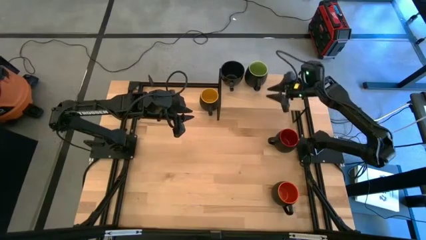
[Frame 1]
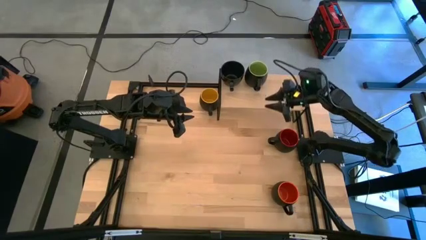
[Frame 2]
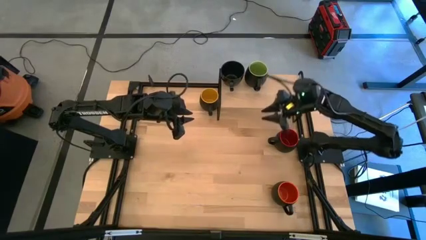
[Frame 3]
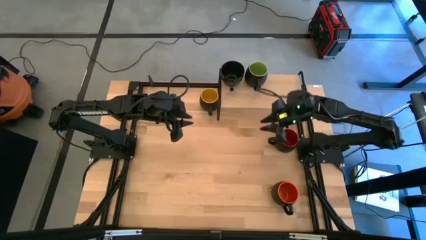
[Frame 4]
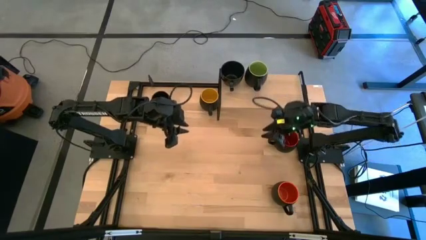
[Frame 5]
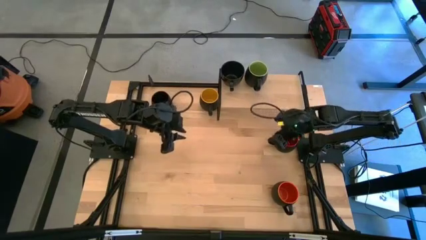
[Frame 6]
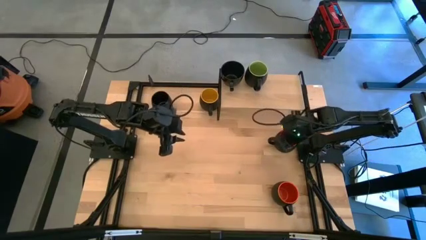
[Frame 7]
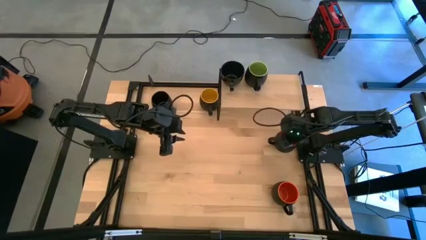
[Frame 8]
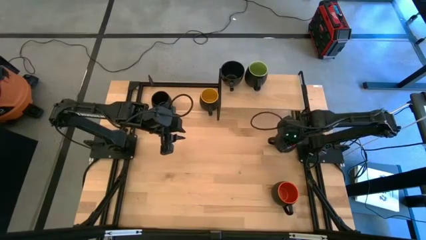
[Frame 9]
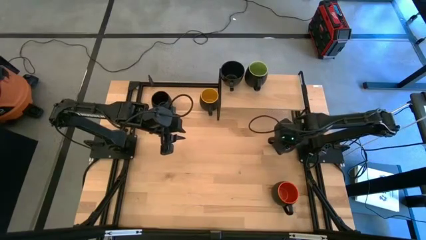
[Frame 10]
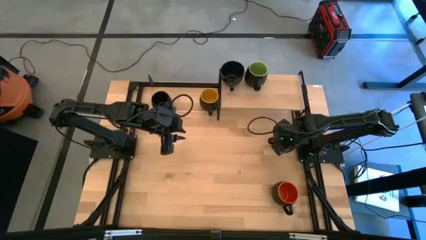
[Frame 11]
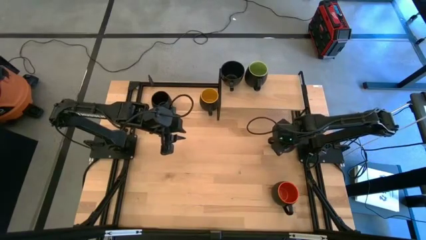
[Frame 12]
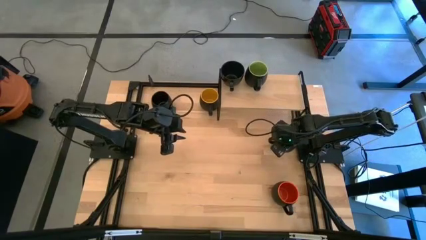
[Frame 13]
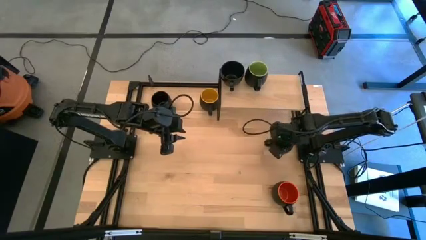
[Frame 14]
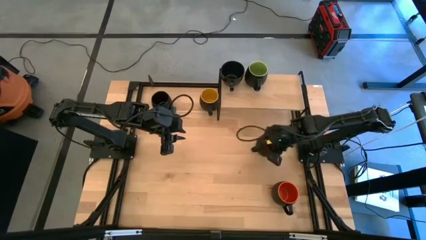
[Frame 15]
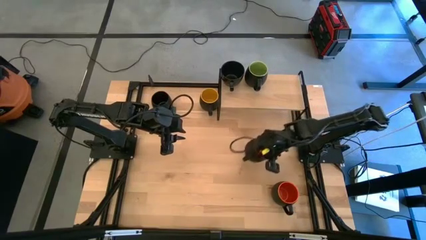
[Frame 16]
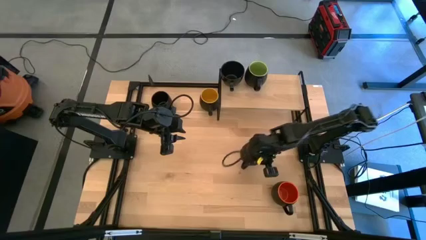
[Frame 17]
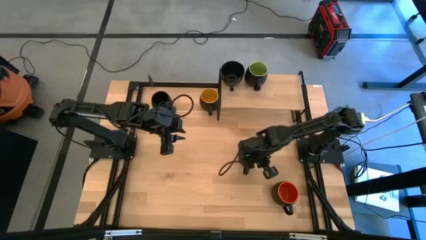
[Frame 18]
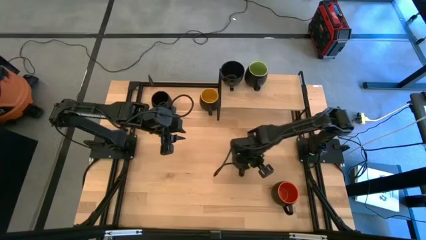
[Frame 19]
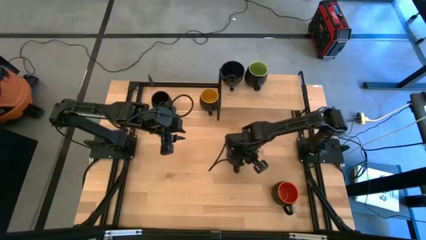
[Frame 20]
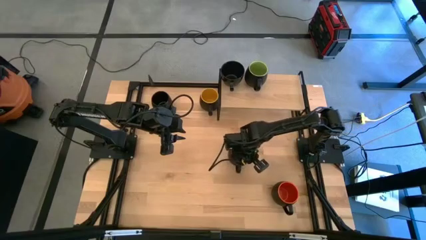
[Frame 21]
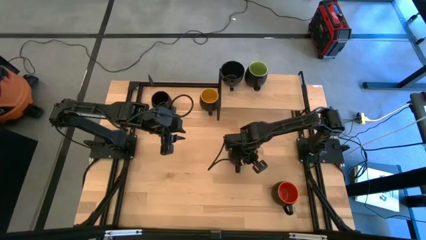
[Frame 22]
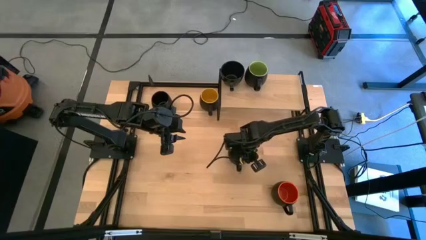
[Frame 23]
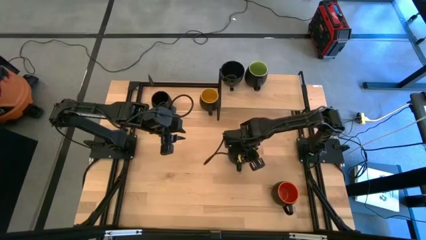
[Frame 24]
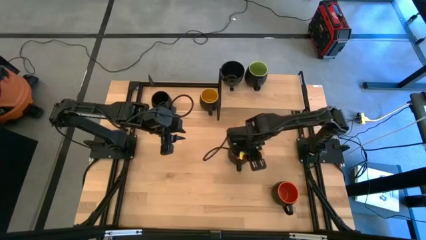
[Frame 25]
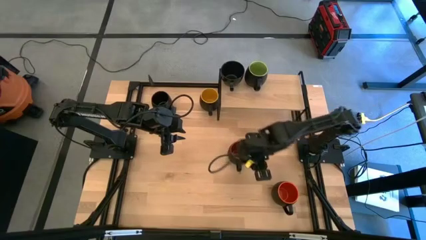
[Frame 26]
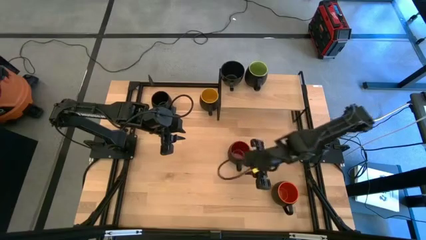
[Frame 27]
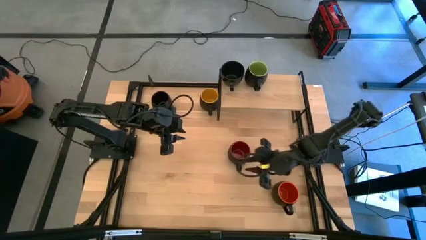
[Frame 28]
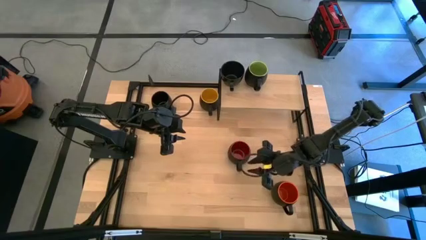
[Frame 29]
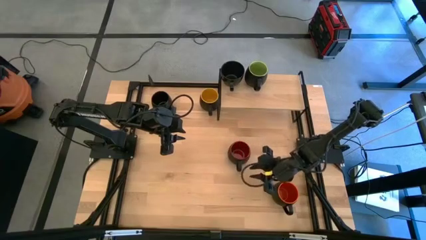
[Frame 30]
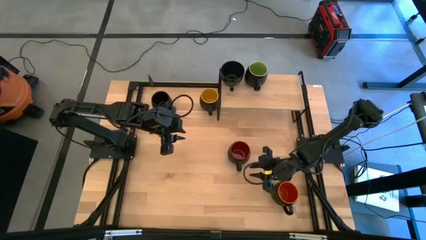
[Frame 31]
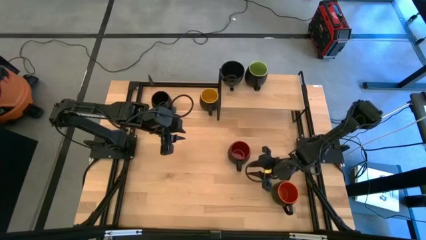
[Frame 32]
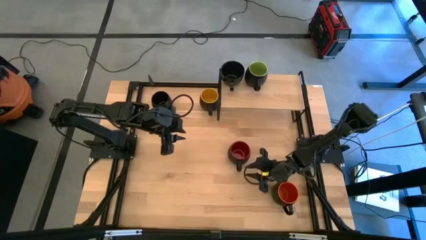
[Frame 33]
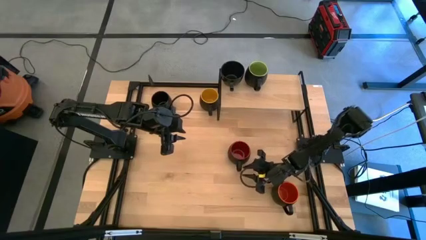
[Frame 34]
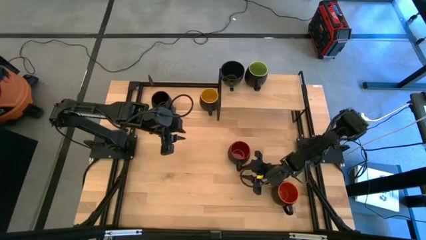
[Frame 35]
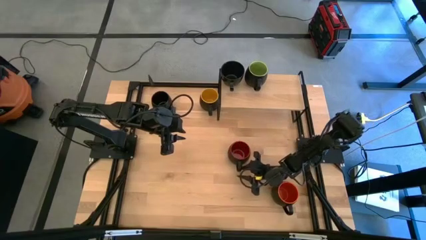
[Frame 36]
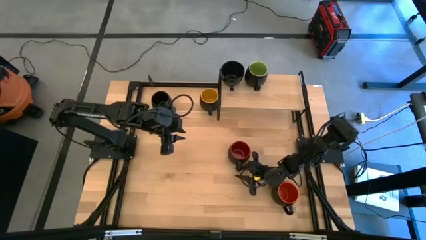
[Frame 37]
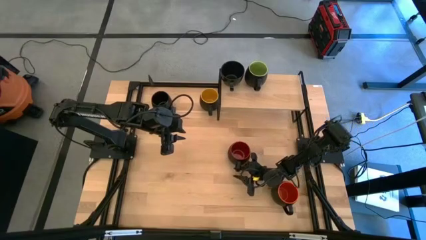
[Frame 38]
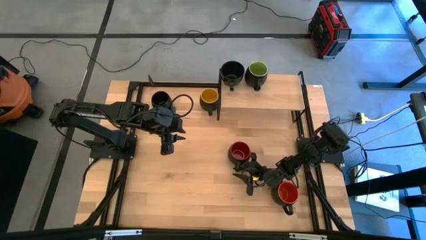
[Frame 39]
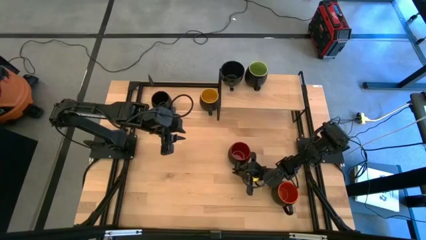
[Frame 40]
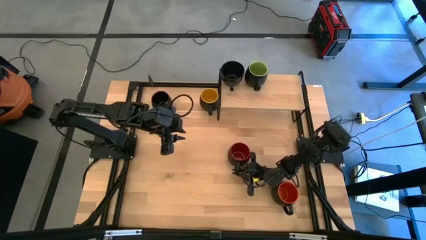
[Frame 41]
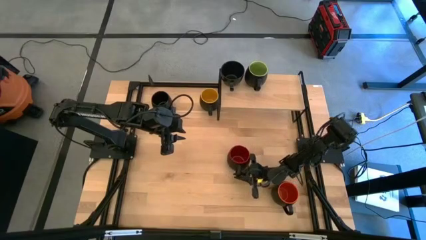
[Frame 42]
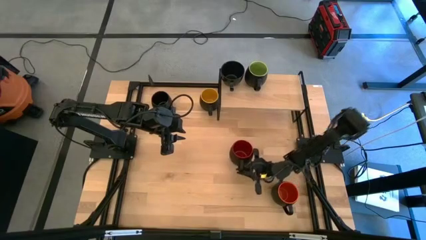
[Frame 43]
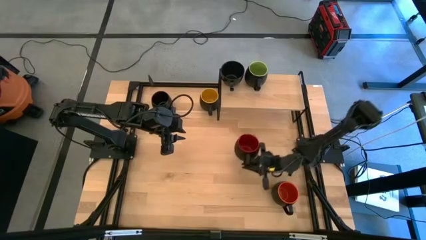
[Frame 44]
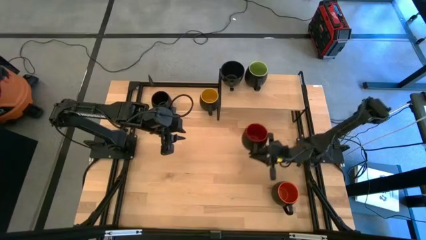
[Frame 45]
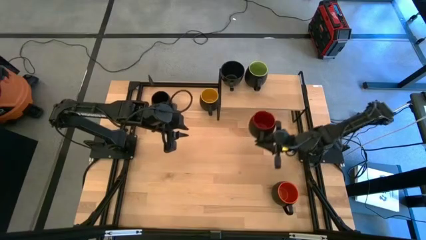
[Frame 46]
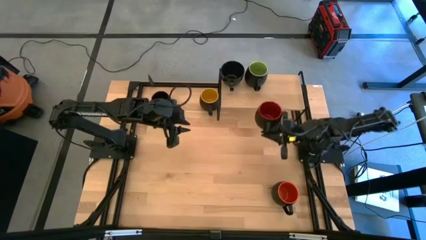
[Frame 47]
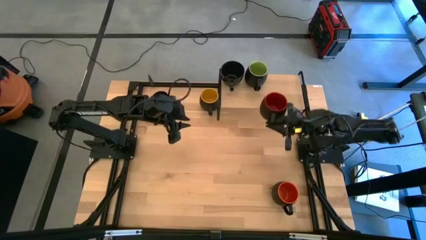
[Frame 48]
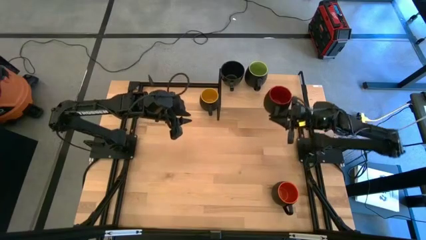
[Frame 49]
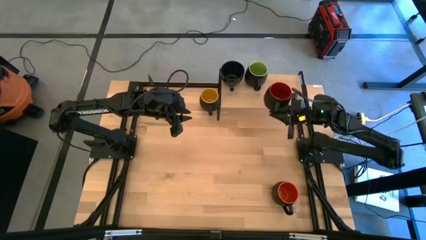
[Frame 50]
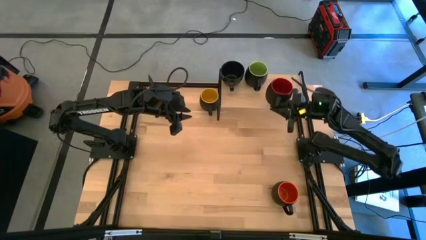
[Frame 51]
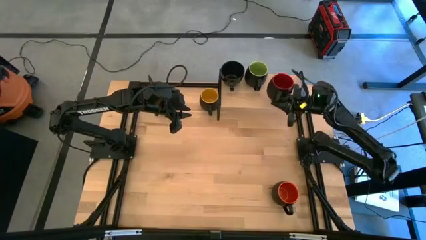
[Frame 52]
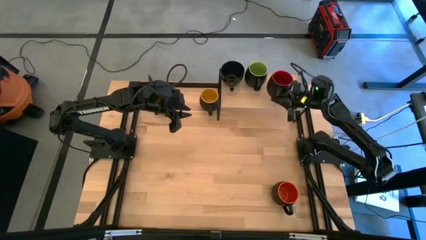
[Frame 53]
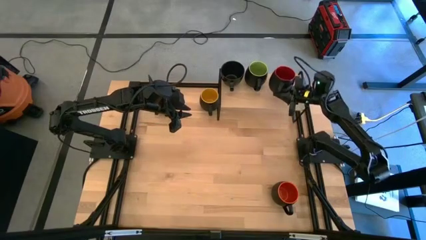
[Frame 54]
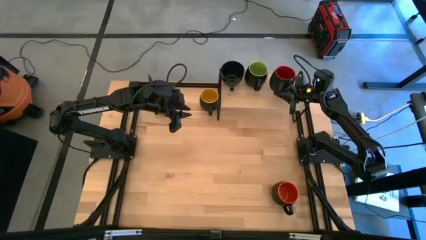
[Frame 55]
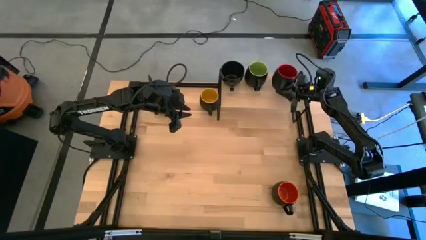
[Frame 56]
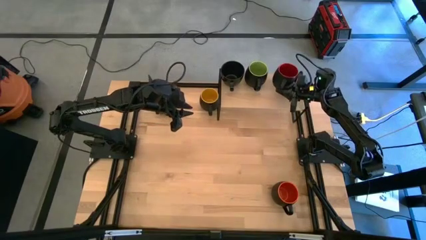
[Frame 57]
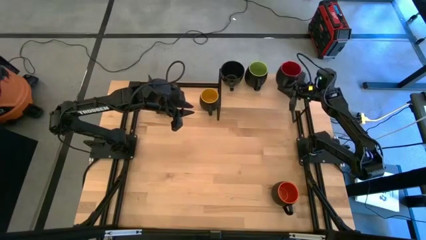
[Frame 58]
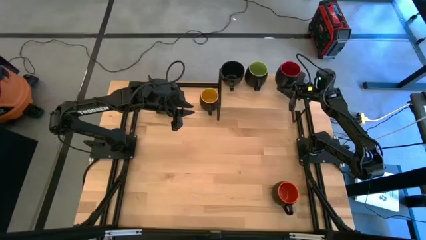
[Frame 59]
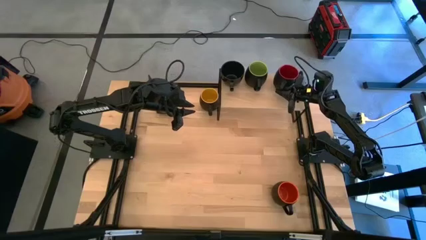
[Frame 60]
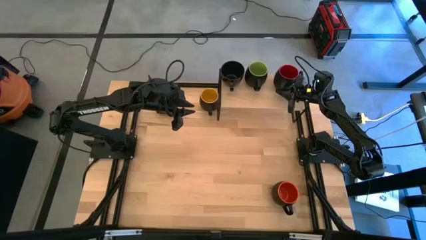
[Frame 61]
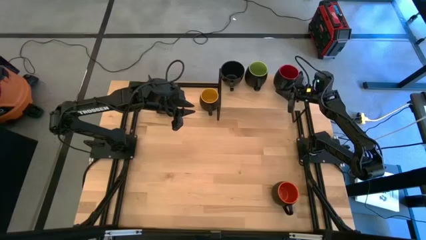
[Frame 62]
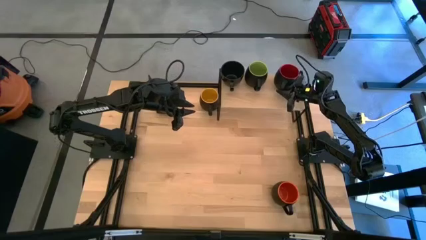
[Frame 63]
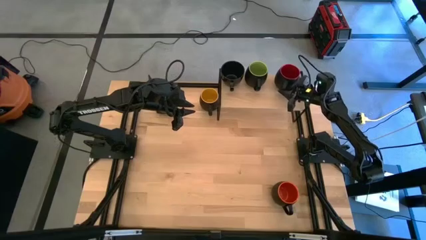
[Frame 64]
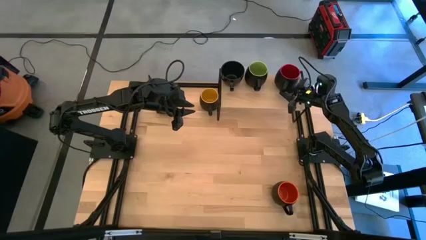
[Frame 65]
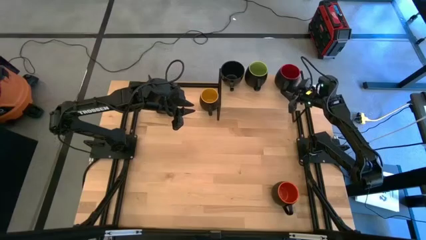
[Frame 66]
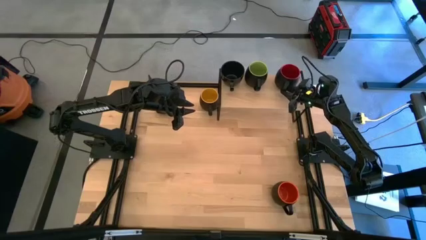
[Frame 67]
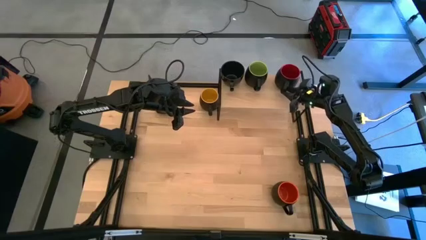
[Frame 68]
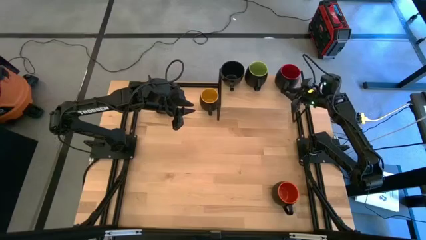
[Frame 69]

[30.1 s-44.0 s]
Task: Place coffee mugs
Put the black red mug on the shelf
